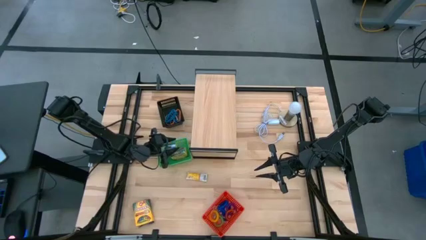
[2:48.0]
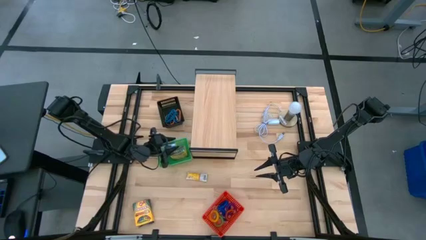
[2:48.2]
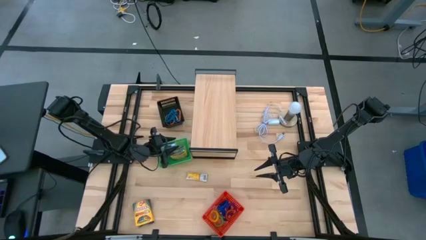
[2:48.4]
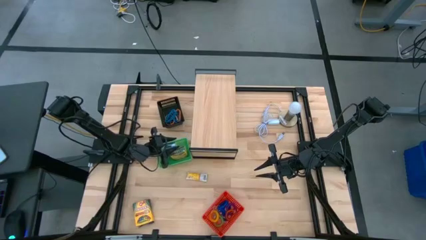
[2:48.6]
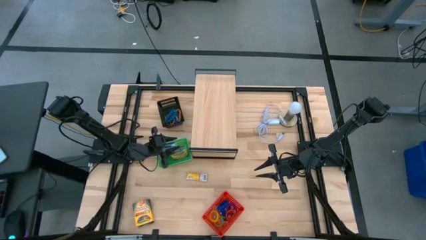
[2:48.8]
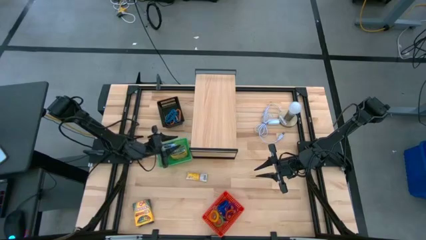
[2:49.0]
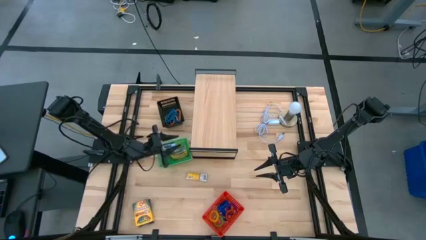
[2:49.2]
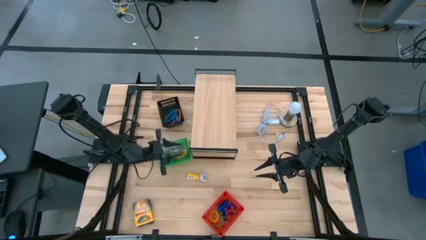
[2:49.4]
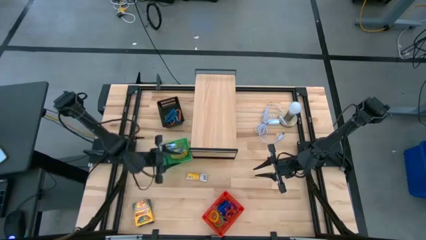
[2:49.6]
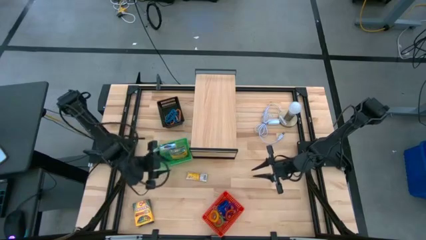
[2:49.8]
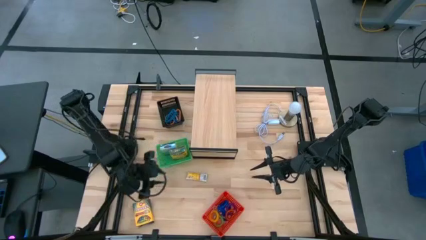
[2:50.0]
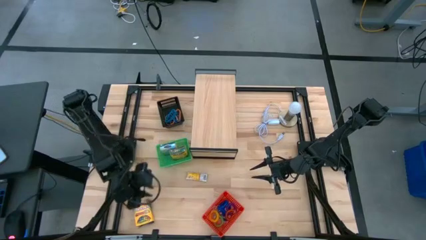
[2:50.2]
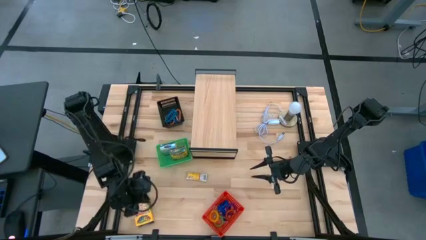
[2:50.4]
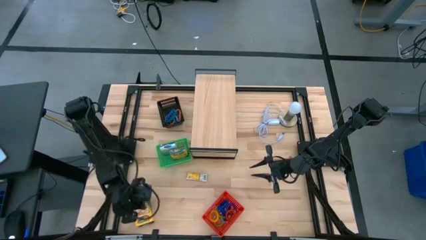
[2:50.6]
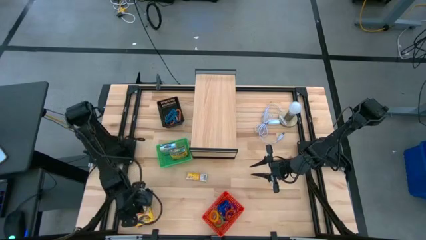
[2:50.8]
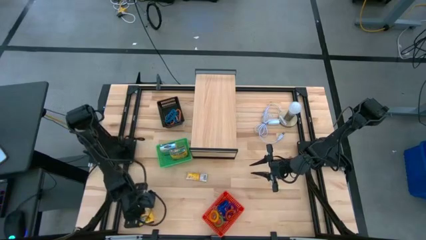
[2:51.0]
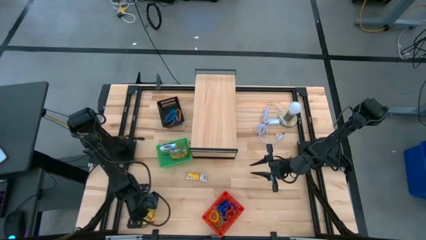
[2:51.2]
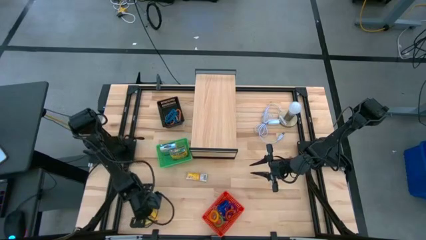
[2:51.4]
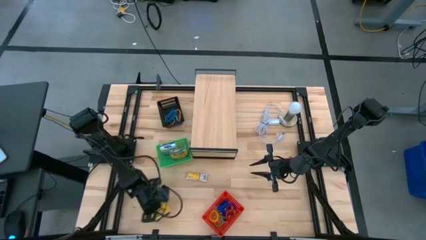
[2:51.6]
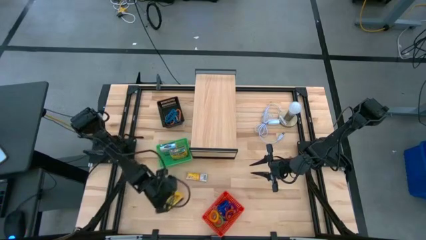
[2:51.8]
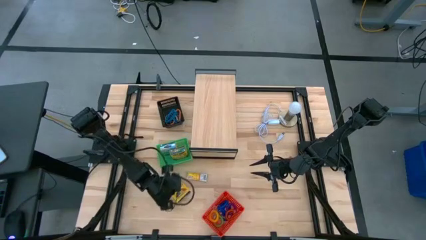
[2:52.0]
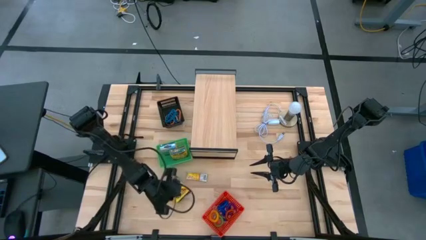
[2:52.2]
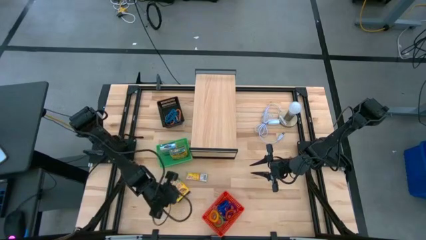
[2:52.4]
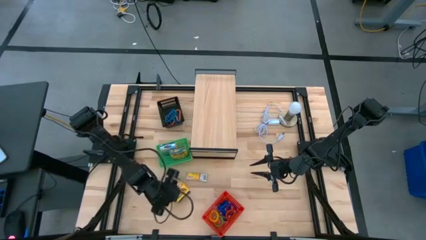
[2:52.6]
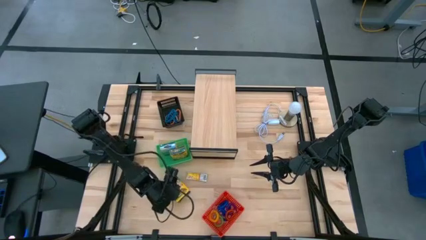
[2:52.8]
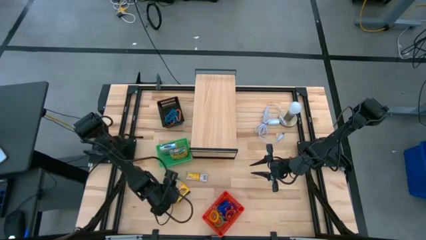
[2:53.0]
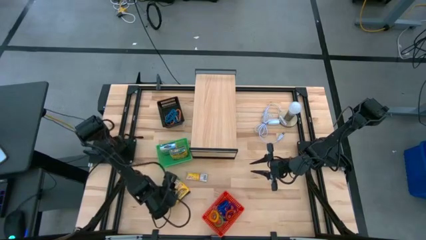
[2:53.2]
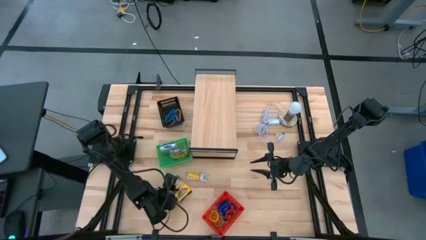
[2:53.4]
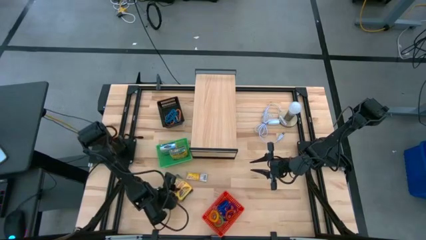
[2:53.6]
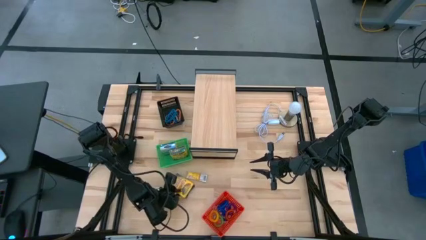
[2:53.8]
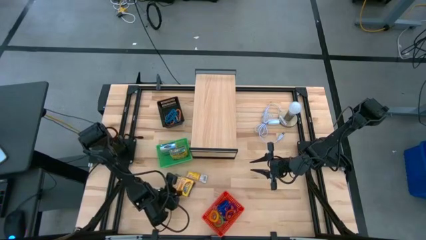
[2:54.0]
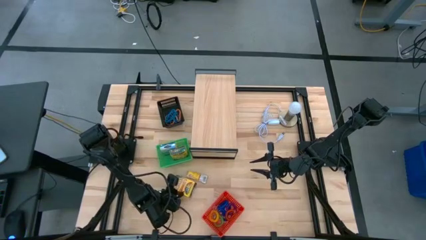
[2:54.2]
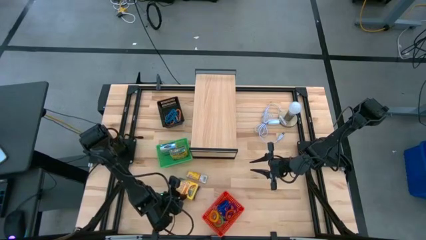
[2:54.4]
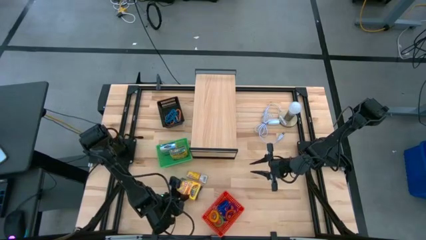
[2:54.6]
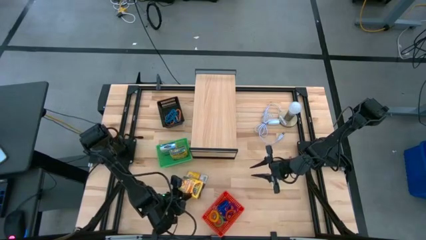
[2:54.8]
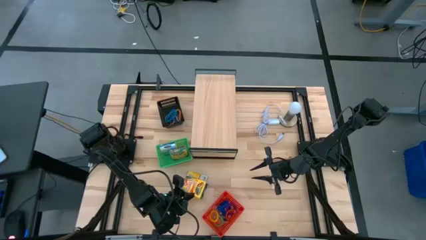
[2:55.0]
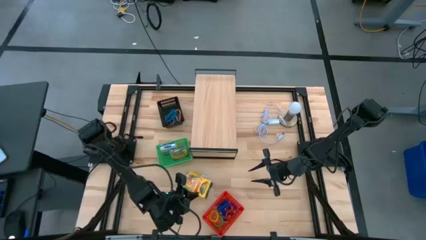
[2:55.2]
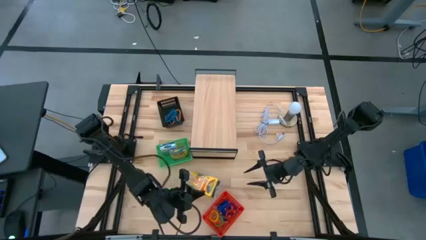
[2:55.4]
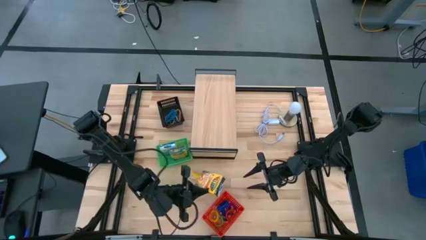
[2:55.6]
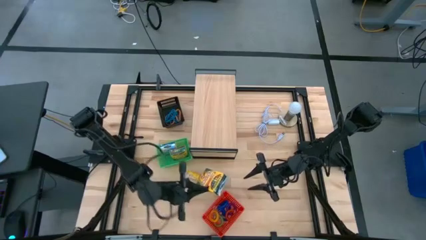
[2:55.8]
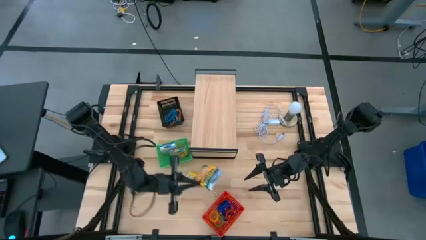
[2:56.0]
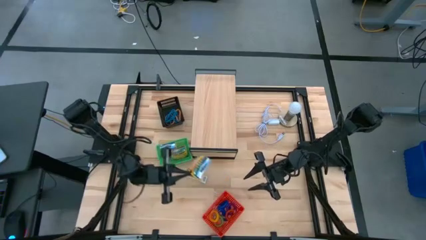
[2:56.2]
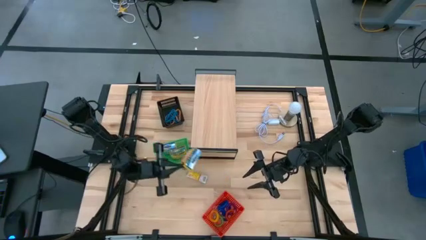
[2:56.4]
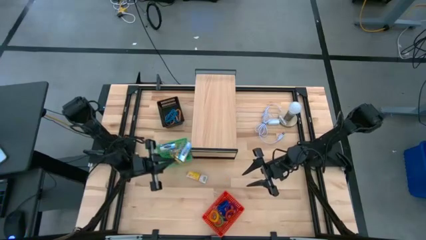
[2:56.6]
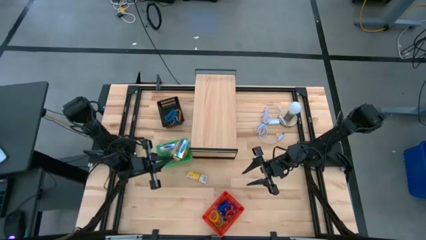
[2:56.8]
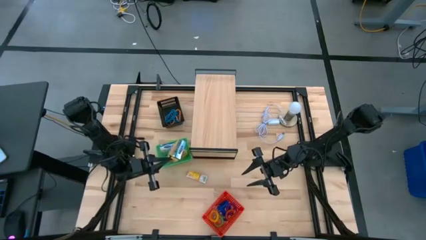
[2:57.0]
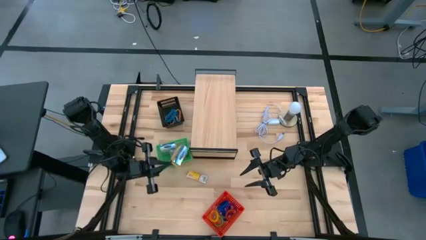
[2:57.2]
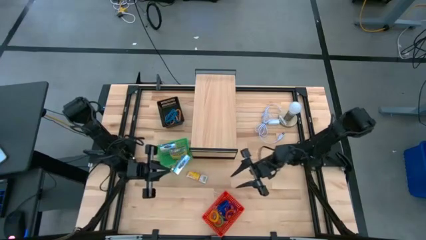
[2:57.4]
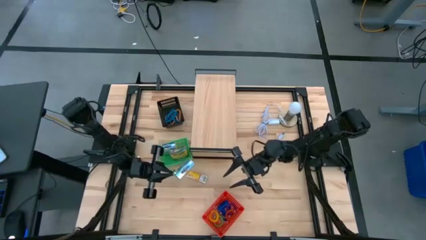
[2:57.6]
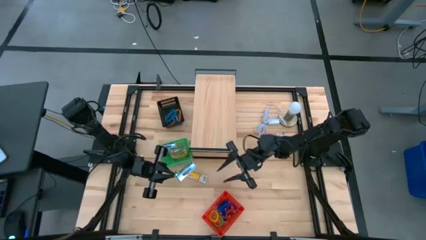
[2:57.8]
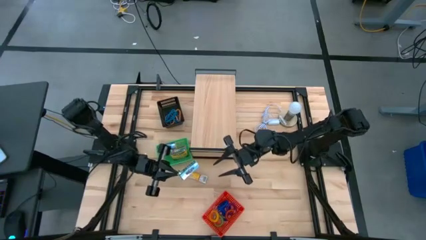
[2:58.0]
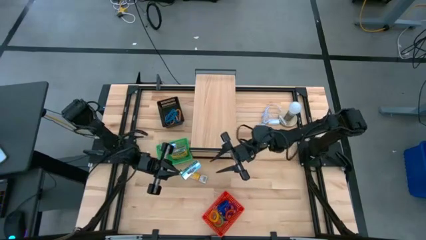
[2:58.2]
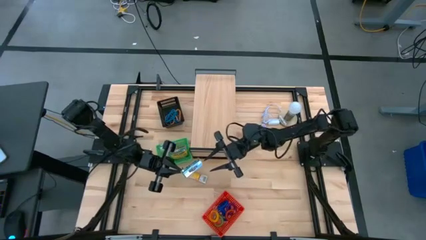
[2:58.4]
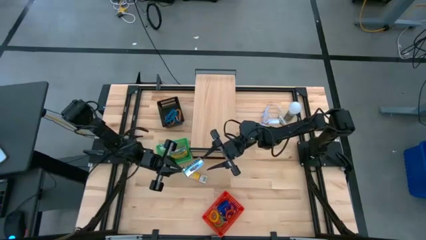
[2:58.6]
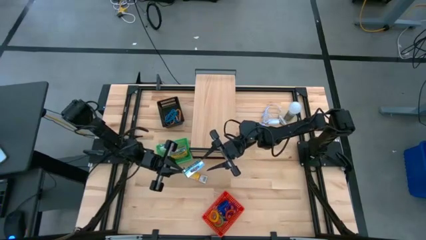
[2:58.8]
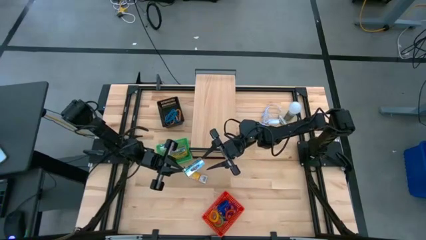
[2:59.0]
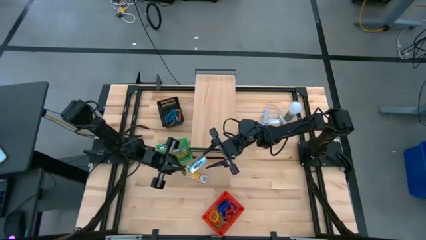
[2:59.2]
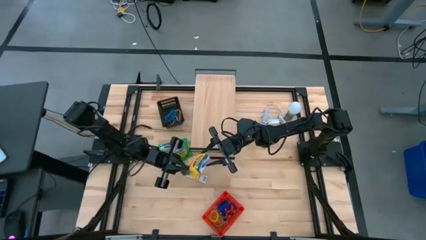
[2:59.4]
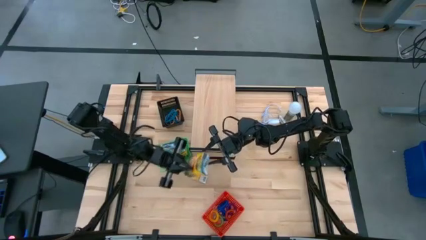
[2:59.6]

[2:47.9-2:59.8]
Task: Pick & Place Office Desk Supplies
Put the large yellow crayon box into the green basket

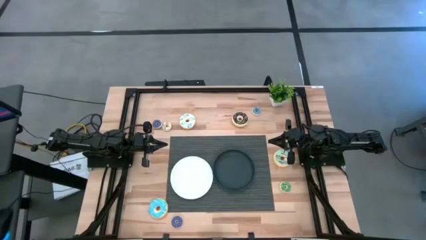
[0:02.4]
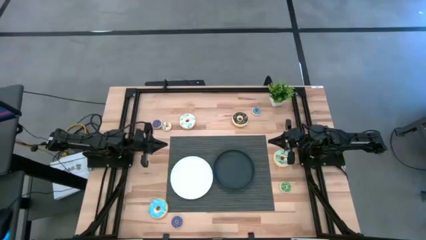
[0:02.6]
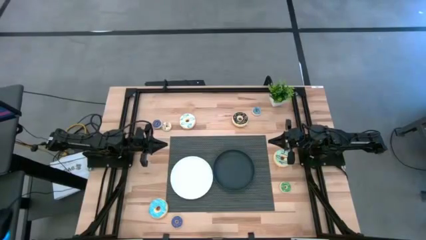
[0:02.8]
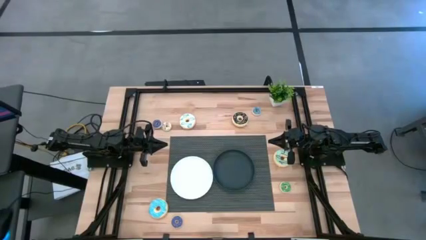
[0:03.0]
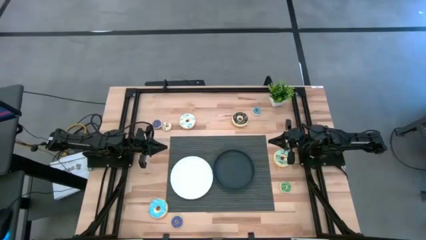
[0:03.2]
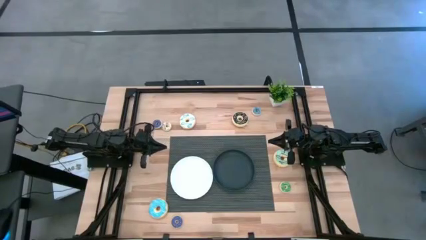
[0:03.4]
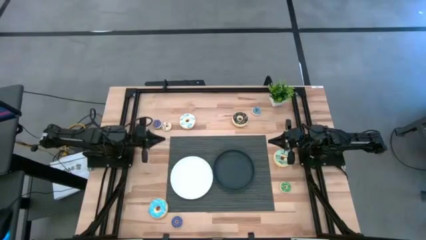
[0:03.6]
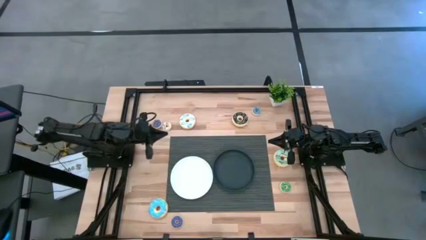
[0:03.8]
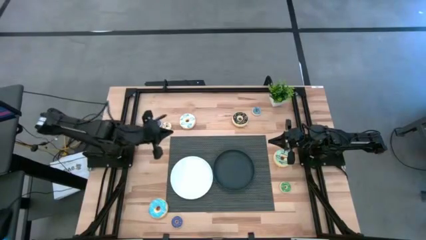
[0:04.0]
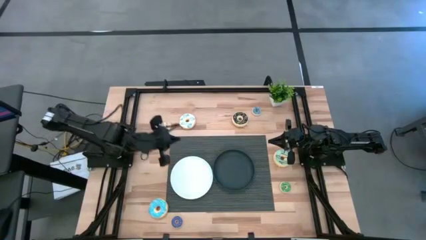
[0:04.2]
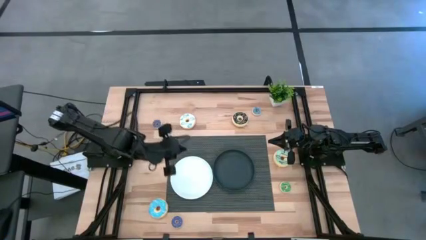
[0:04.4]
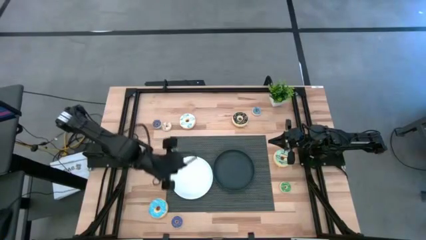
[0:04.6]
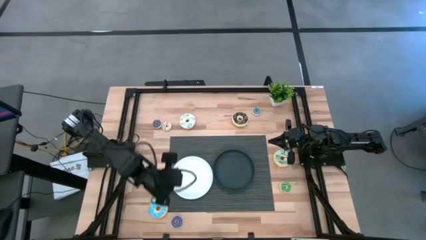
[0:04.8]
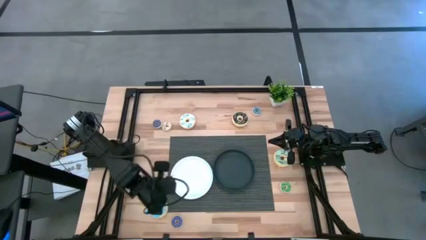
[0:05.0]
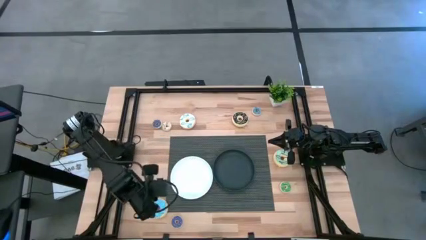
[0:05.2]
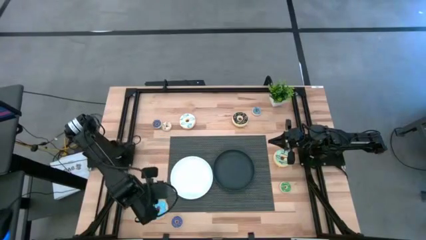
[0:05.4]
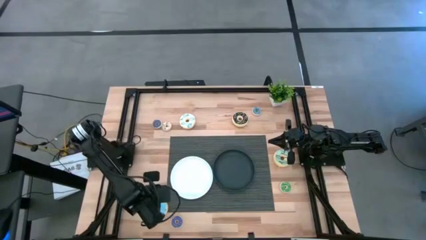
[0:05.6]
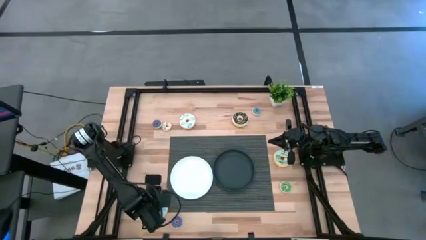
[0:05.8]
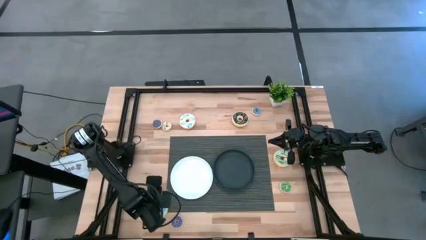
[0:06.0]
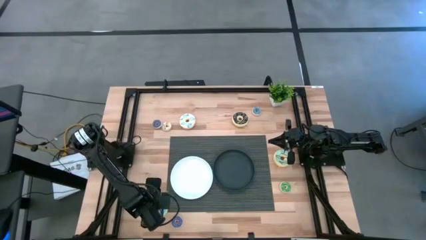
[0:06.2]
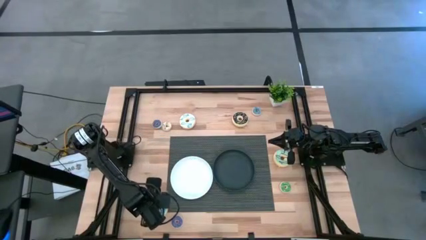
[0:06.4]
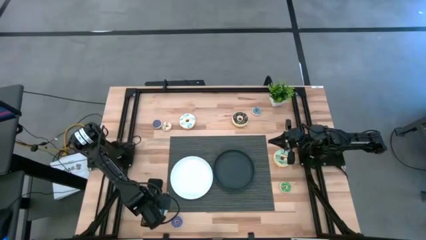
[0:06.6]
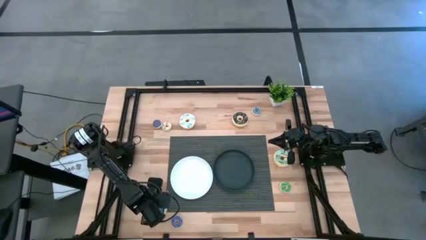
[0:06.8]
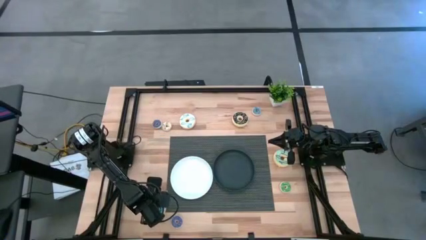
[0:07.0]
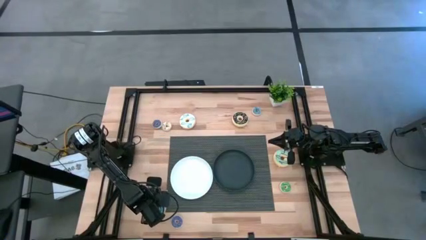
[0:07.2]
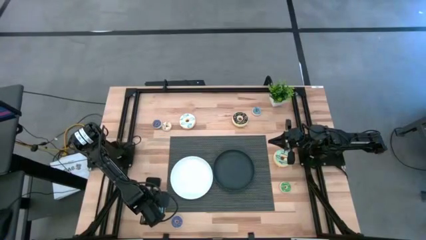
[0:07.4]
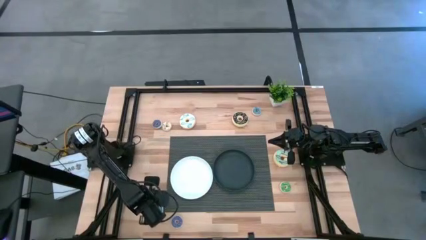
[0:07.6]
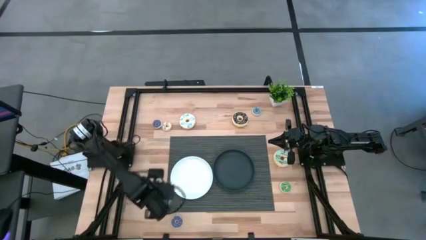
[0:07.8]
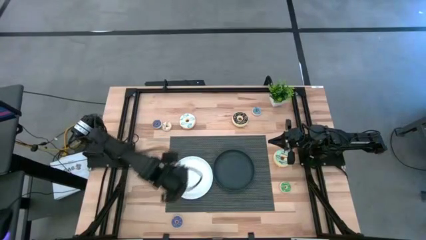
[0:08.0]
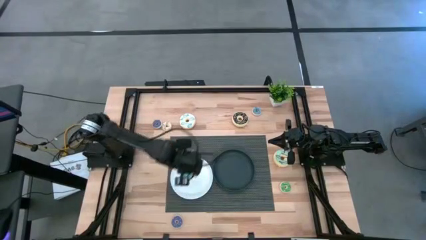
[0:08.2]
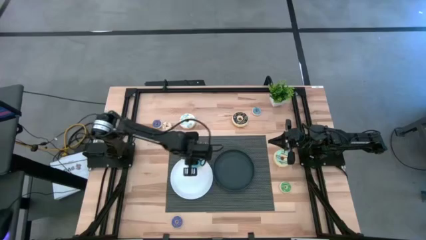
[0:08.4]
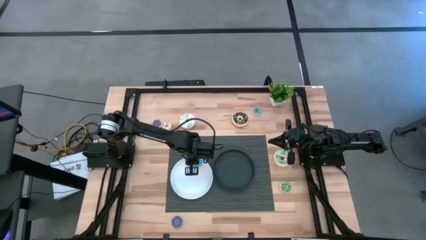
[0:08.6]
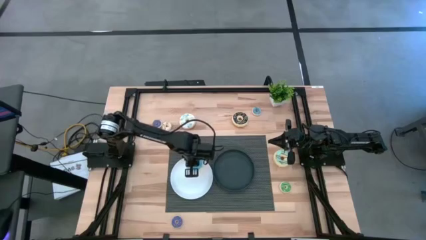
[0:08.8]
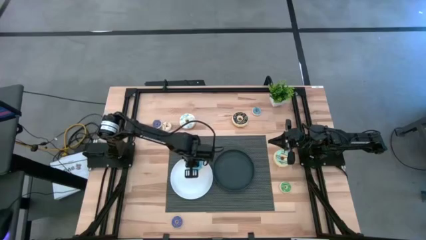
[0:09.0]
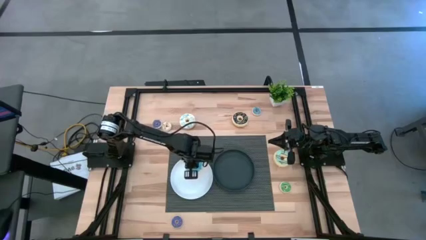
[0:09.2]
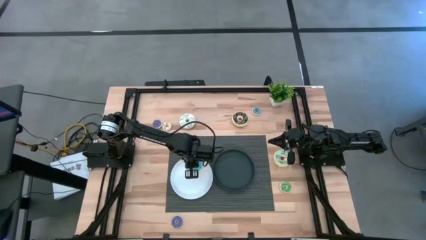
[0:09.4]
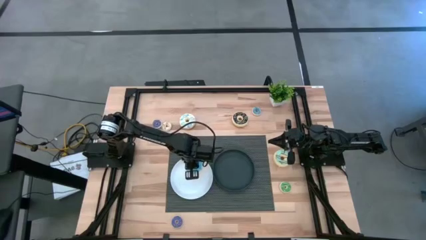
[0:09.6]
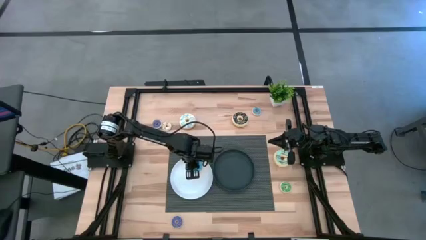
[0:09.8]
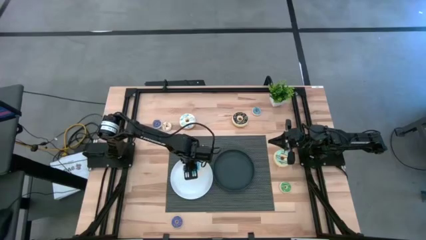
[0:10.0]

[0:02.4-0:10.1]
Task: Pick & Place donuts
Put the big blue donut on the white plate
